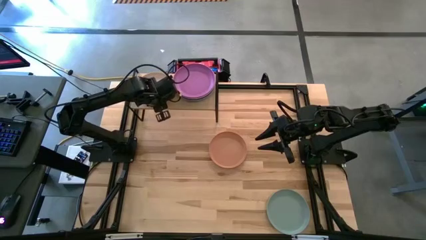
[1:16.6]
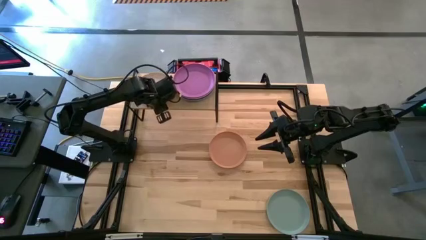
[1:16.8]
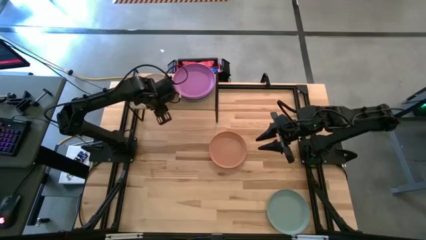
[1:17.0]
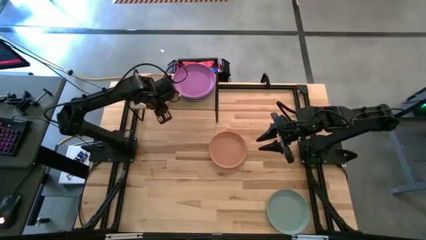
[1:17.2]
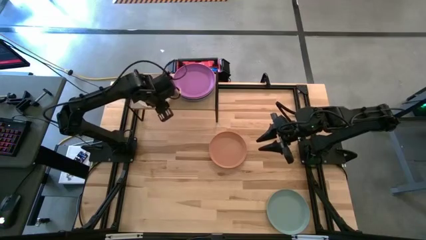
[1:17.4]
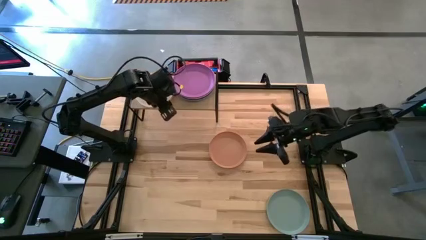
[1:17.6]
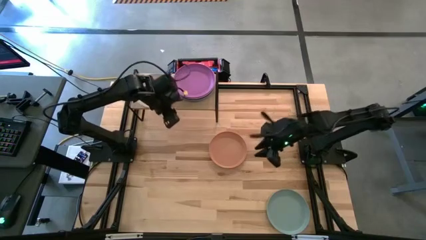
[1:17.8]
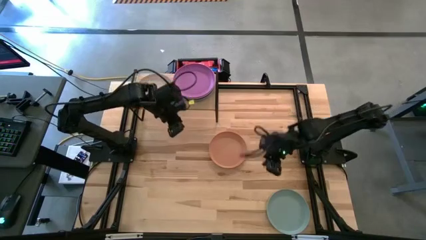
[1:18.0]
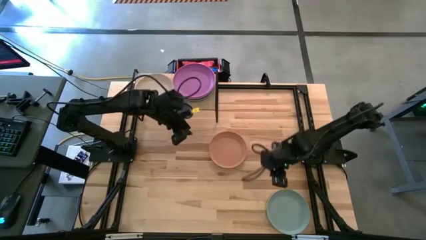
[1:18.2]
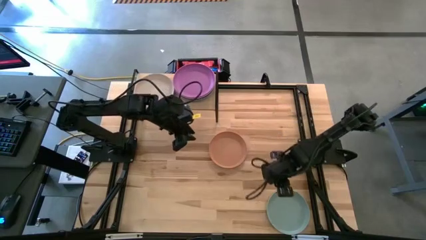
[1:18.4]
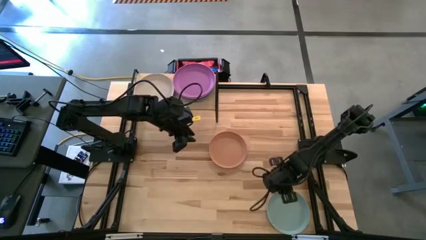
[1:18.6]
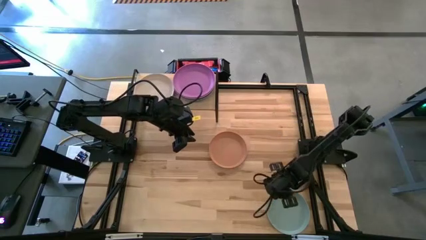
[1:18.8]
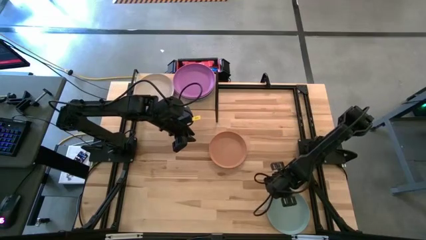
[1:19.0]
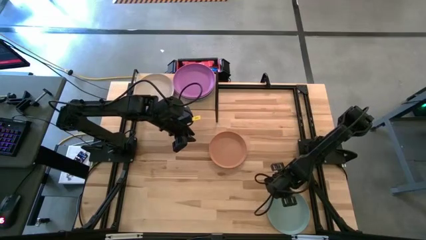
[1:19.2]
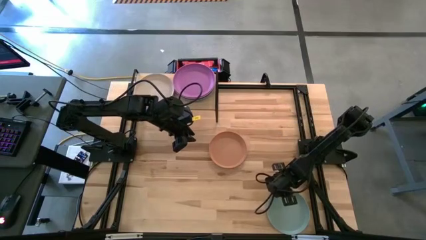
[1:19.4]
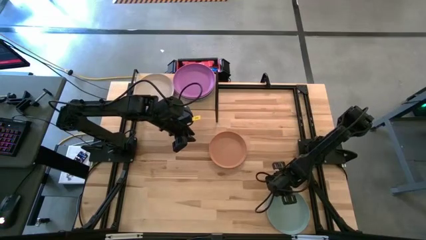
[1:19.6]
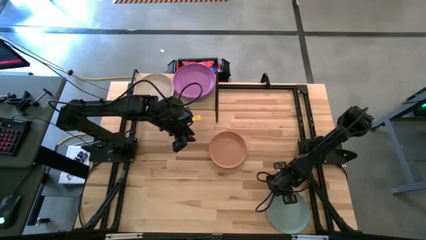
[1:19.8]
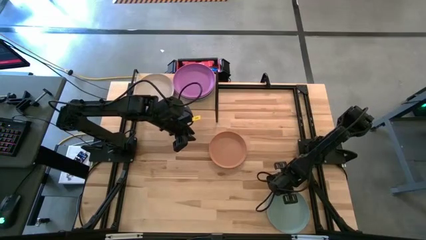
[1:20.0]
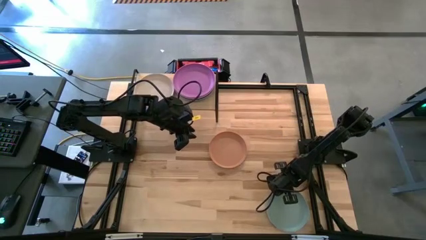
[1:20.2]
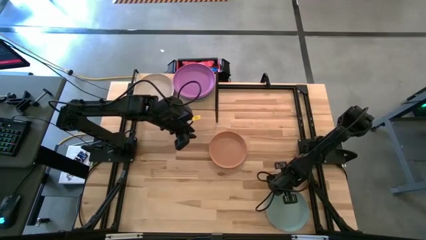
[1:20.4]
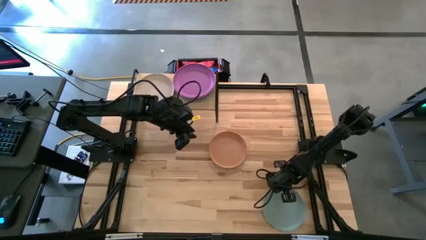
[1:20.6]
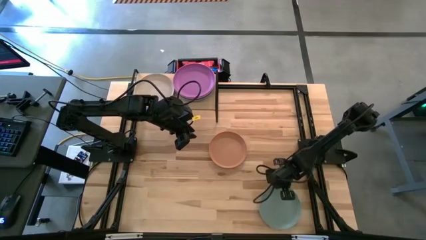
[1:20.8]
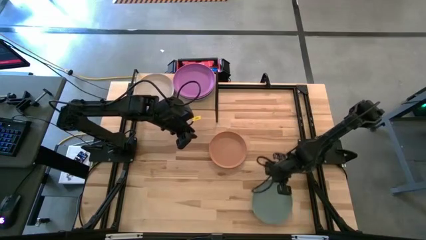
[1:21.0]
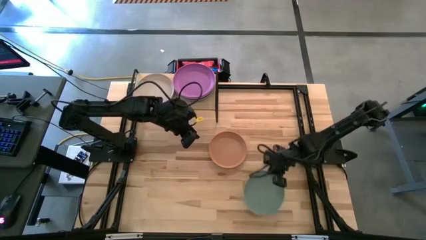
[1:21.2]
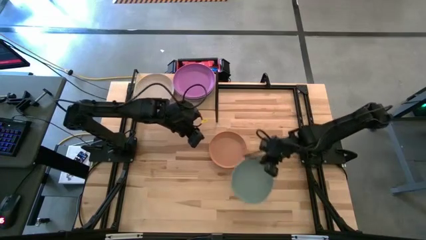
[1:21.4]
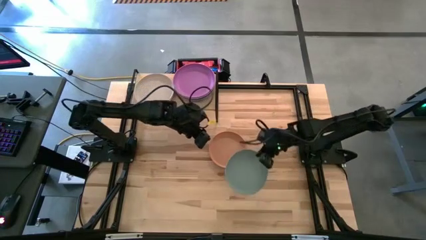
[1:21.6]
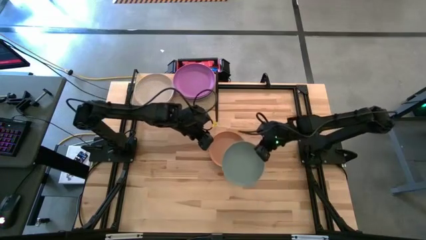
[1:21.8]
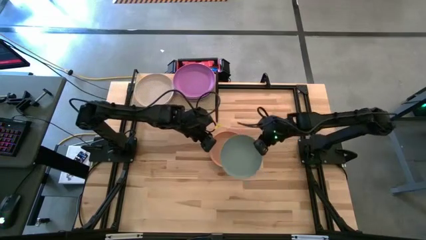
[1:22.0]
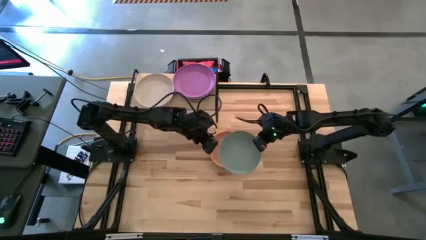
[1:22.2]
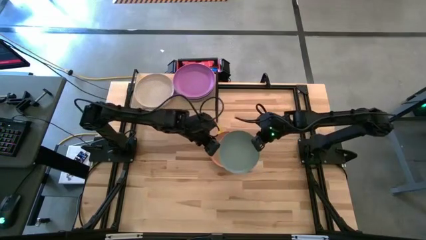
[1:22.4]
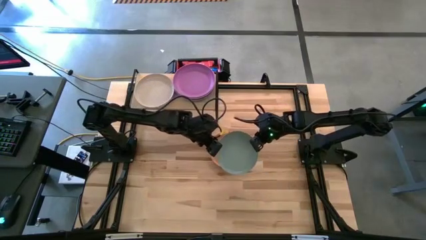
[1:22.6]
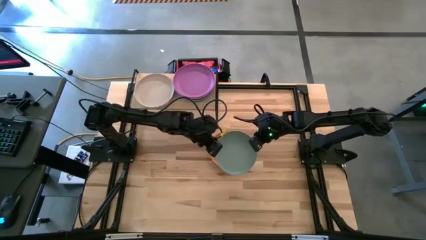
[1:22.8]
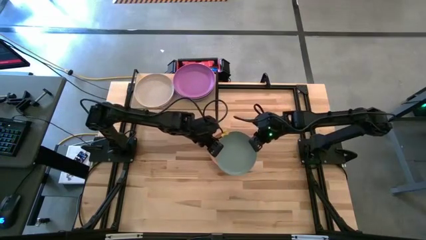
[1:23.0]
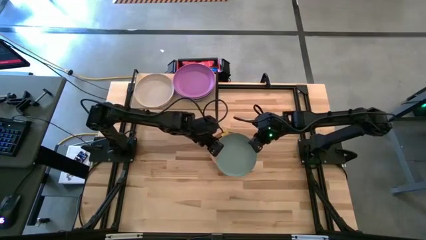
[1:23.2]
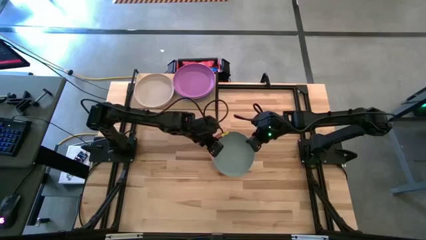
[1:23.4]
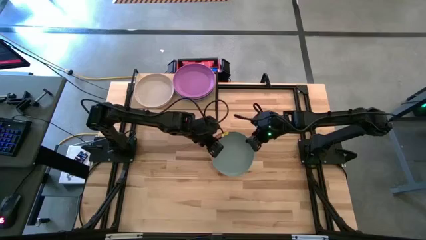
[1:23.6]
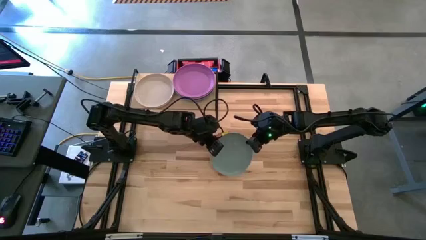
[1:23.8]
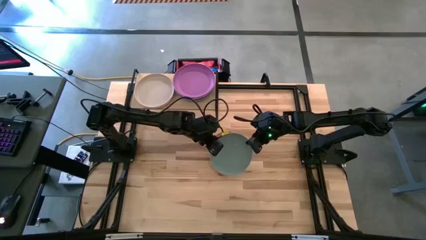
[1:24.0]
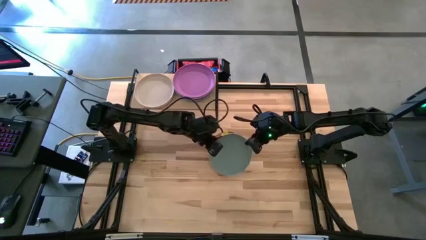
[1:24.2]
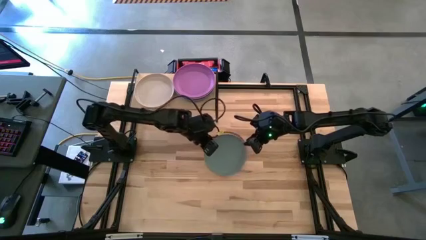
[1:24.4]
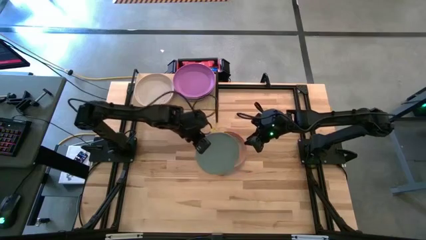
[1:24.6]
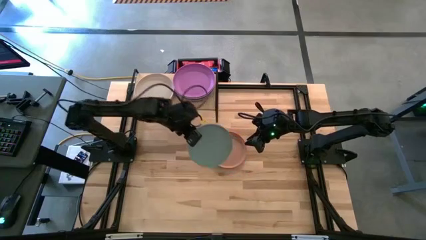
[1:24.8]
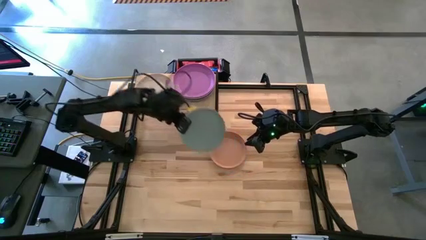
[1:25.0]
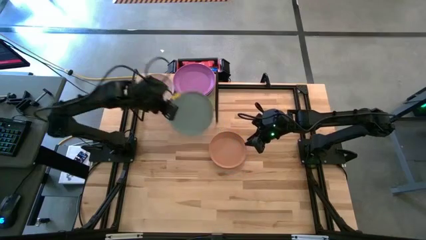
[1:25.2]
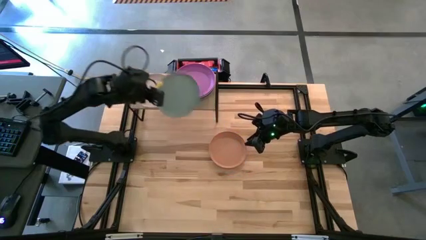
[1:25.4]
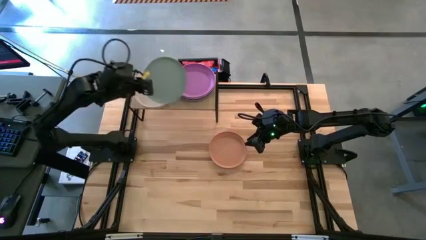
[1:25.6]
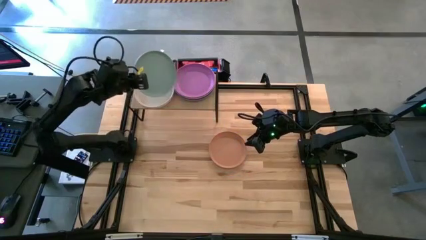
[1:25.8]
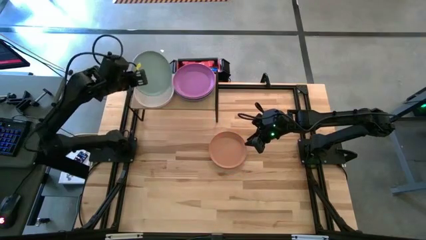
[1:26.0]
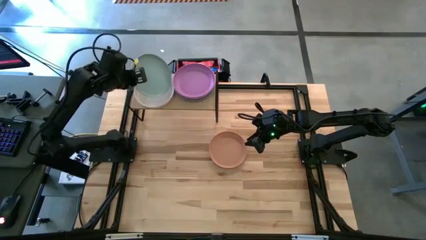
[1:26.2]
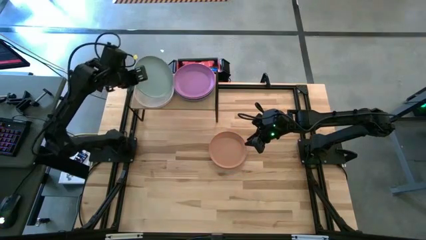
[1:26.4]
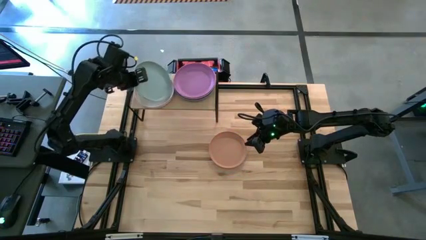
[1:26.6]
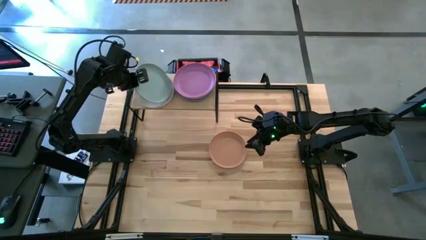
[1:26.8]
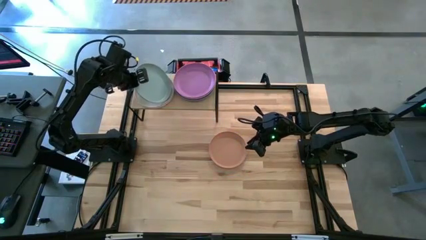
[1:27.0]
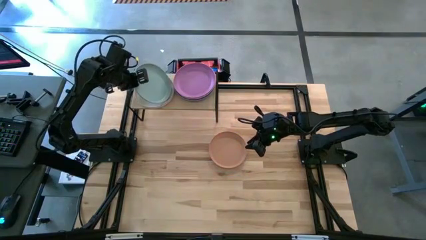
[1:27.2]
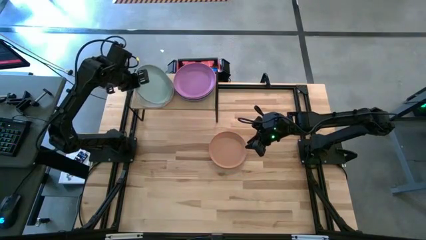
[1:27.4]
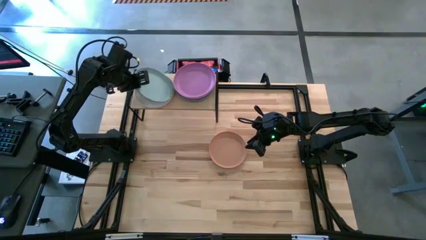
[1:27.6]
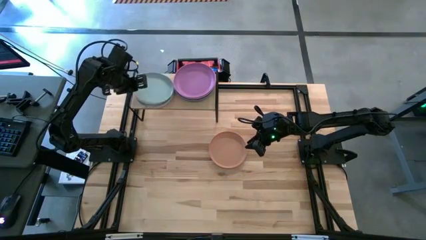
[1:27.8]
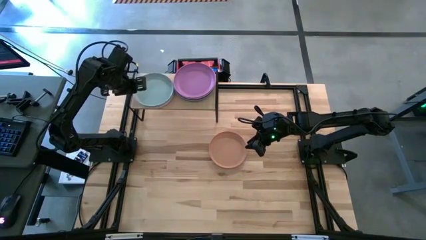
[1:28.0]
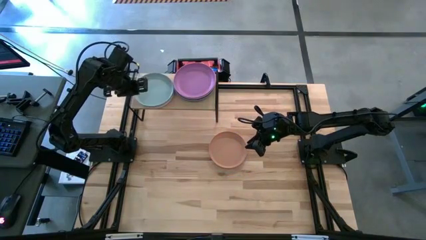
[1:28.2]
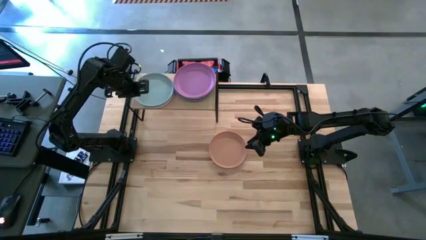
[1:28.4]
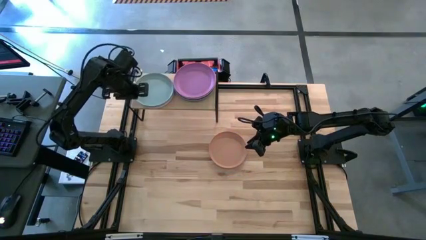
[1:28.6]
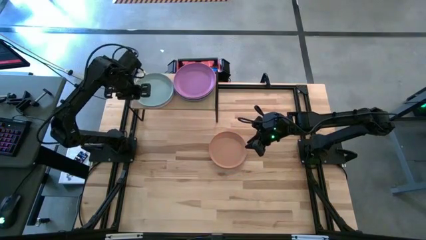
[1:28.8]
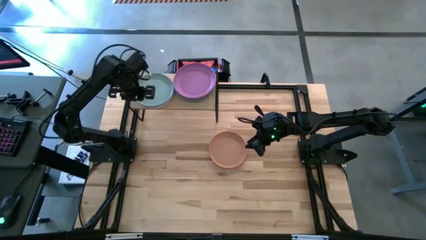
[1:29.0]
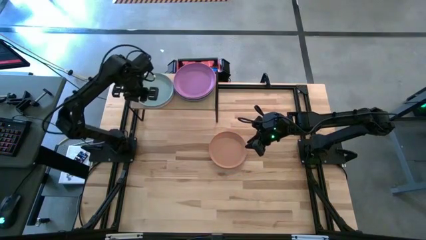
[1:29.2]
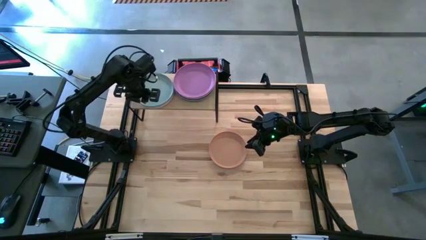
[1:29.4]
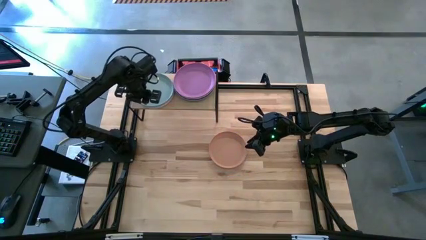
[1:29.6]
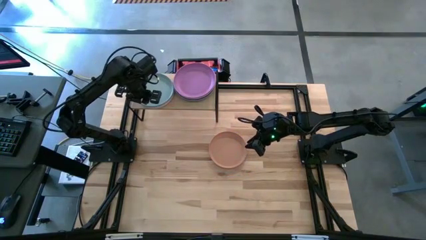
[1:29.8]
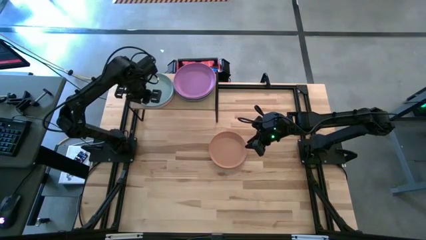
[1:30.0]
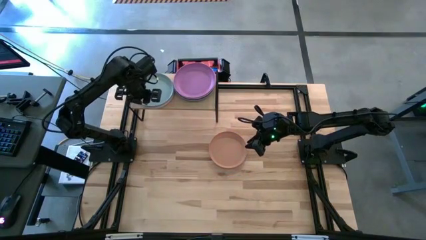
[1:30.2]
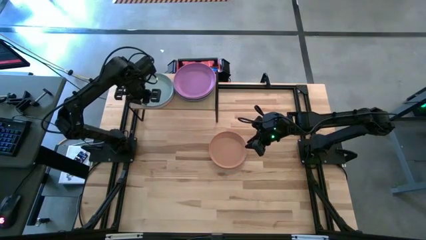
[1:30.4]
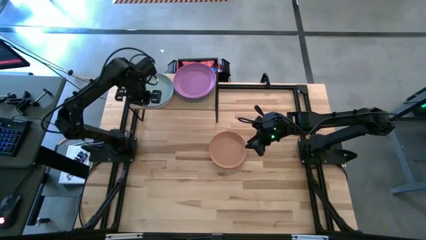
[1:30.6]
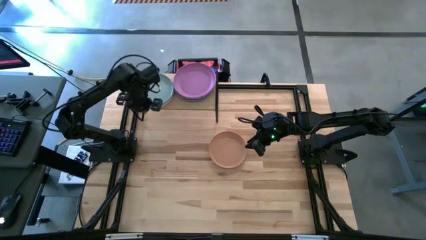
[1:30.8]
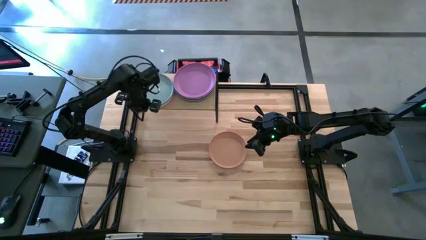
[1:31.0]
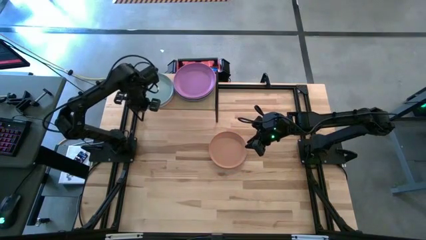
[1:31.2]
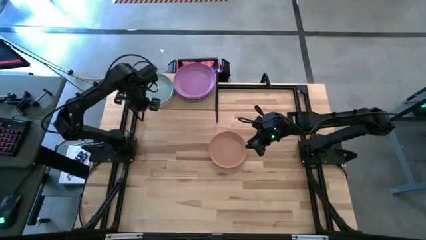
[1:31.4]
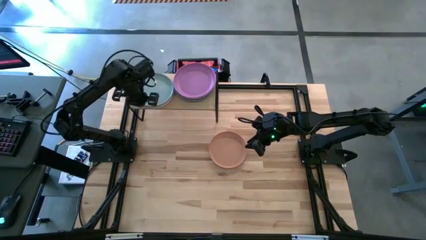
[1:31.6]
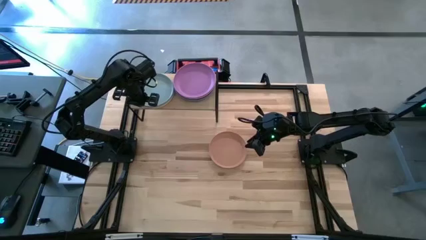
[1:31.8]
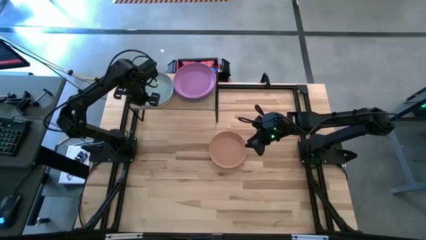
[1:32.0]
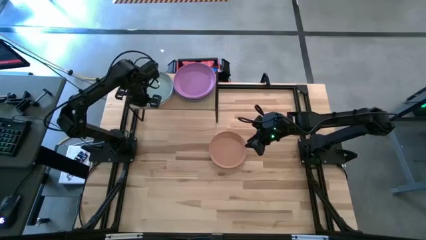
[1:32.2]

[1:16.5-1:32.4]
Task: Place and stack plates onto a shelf
Stack the gray plate on top of the white plate on the shelf
